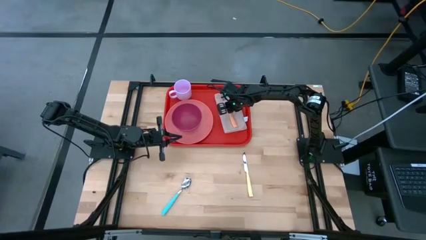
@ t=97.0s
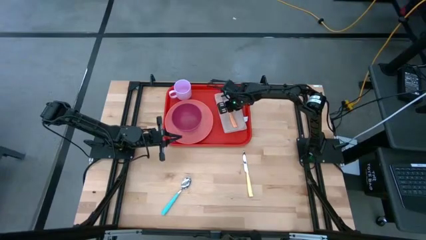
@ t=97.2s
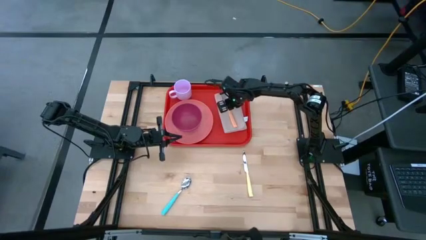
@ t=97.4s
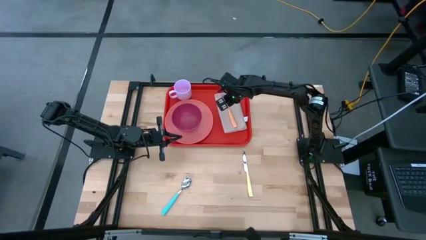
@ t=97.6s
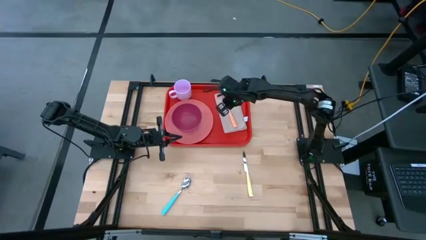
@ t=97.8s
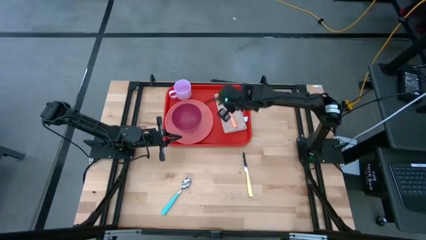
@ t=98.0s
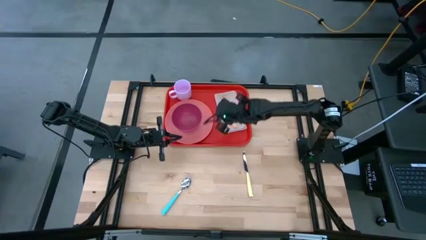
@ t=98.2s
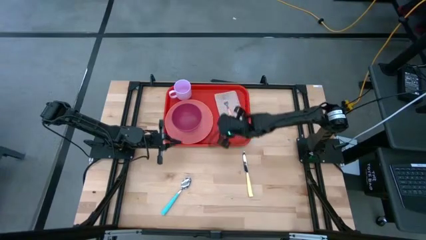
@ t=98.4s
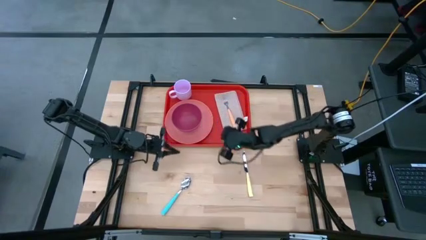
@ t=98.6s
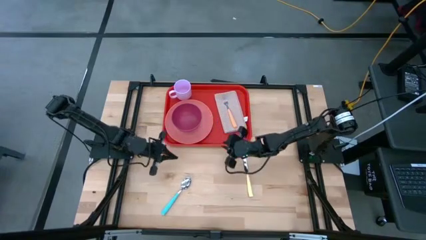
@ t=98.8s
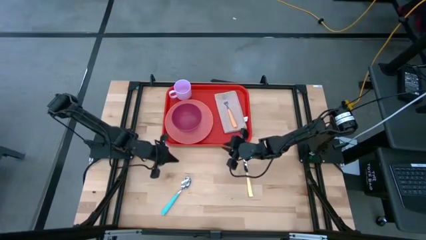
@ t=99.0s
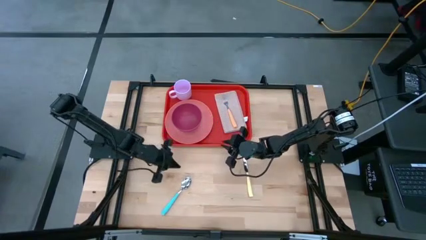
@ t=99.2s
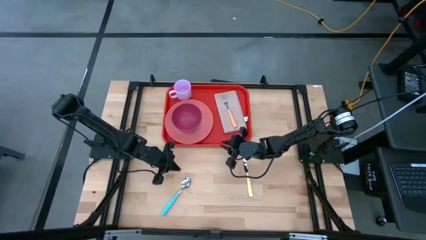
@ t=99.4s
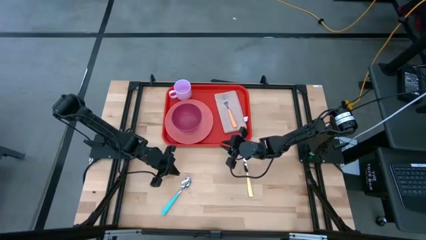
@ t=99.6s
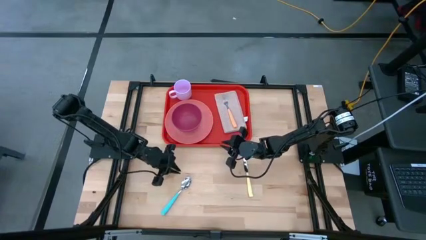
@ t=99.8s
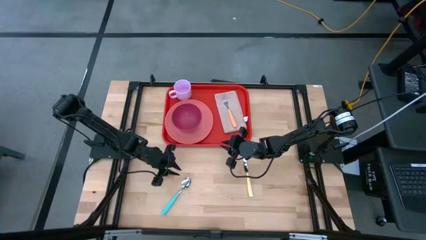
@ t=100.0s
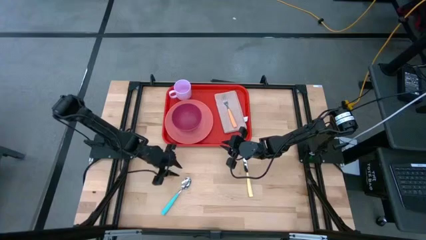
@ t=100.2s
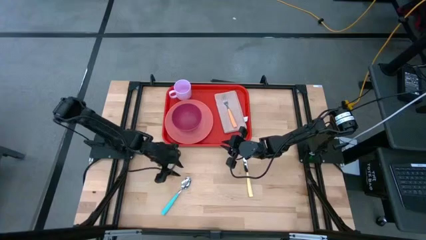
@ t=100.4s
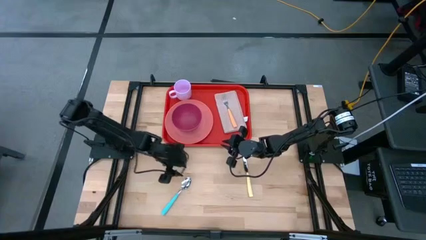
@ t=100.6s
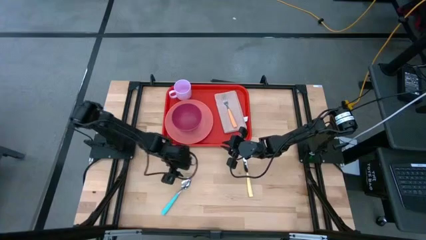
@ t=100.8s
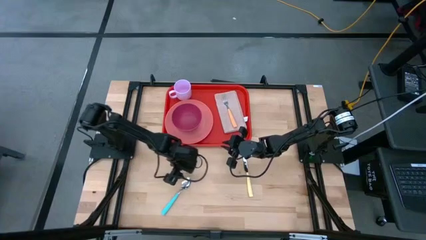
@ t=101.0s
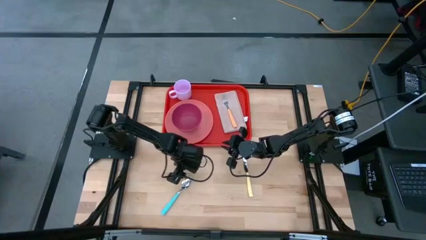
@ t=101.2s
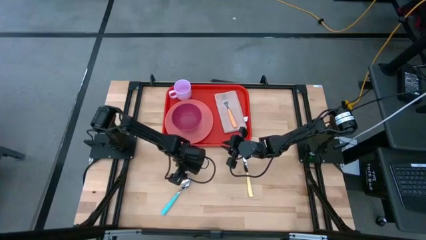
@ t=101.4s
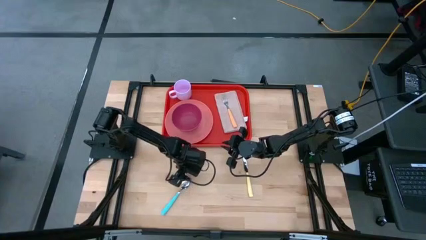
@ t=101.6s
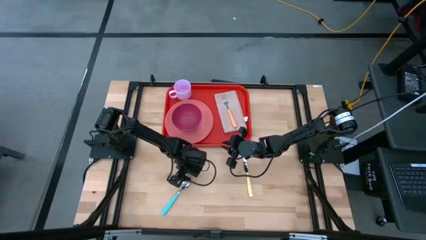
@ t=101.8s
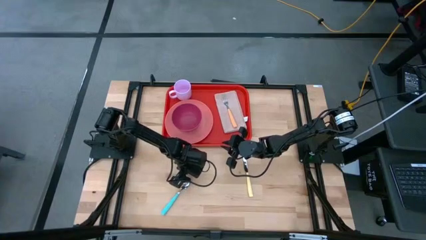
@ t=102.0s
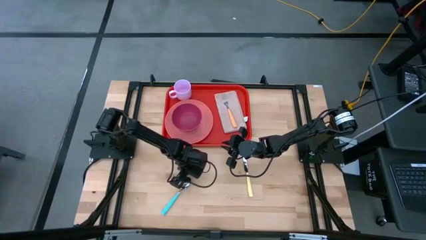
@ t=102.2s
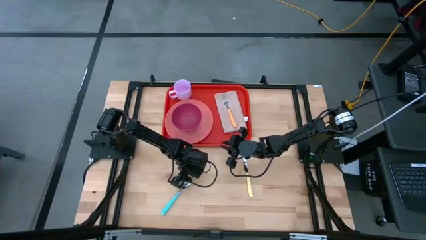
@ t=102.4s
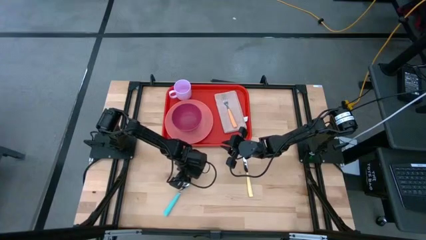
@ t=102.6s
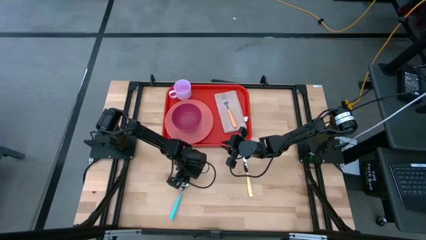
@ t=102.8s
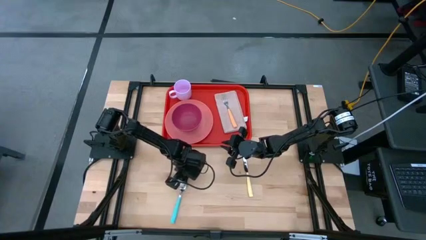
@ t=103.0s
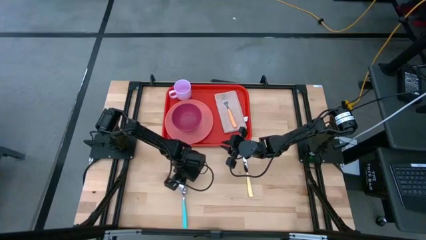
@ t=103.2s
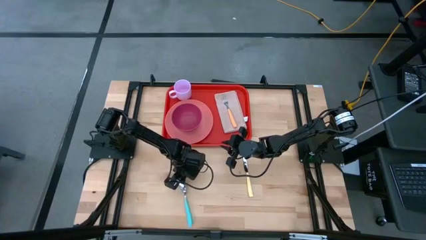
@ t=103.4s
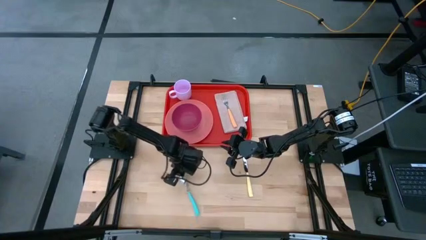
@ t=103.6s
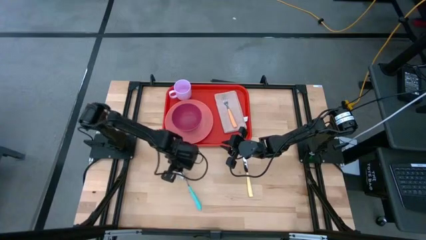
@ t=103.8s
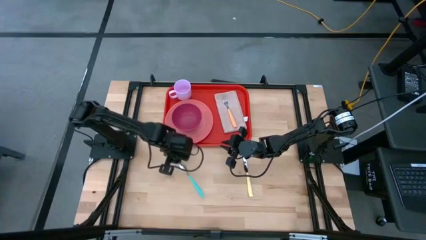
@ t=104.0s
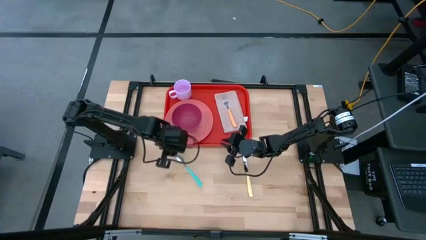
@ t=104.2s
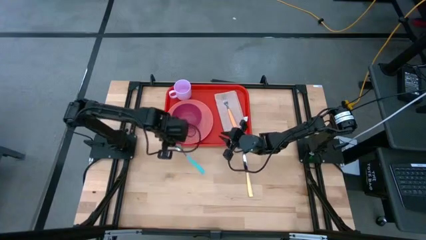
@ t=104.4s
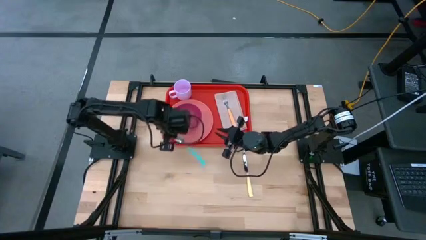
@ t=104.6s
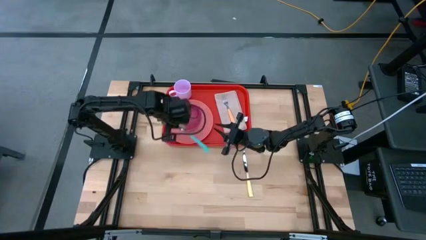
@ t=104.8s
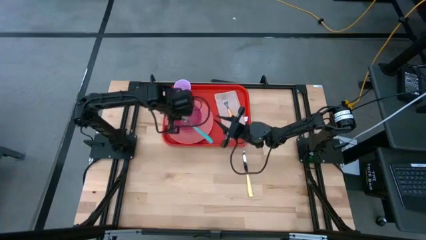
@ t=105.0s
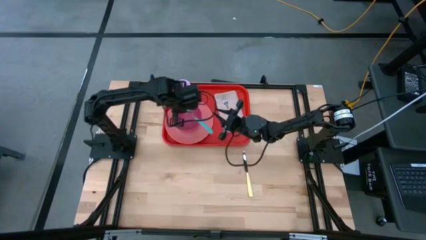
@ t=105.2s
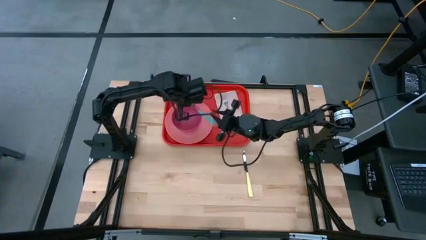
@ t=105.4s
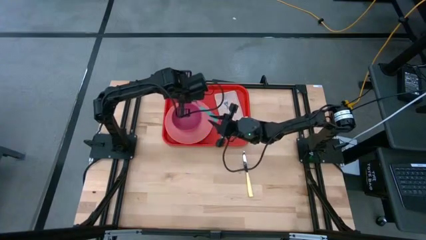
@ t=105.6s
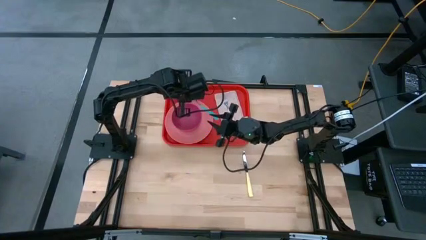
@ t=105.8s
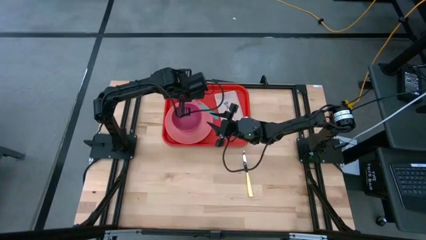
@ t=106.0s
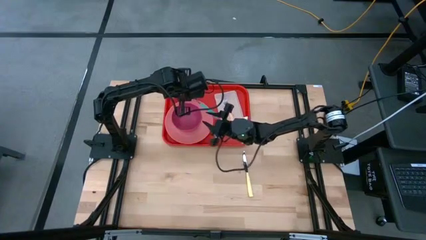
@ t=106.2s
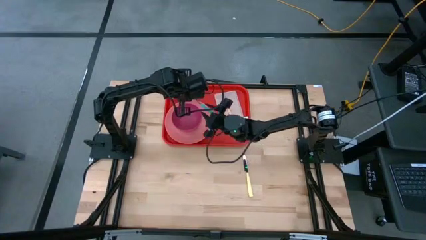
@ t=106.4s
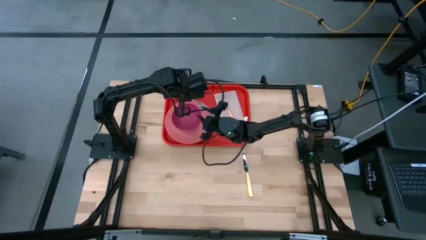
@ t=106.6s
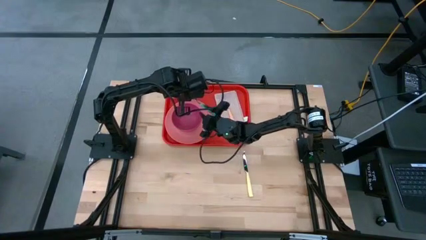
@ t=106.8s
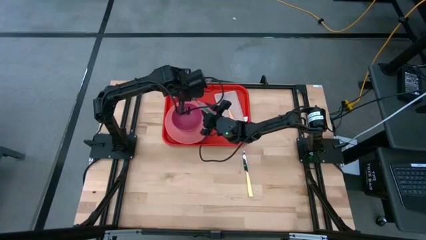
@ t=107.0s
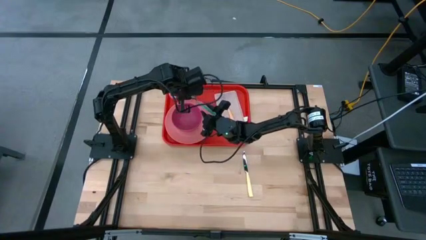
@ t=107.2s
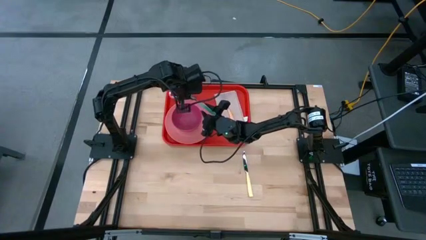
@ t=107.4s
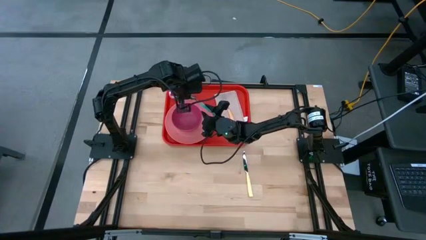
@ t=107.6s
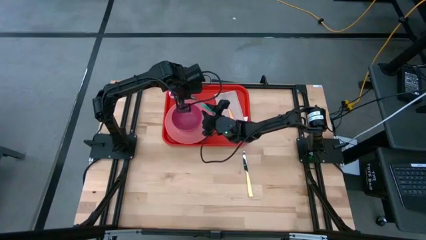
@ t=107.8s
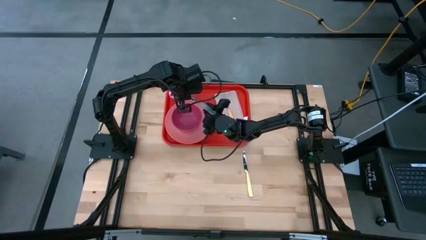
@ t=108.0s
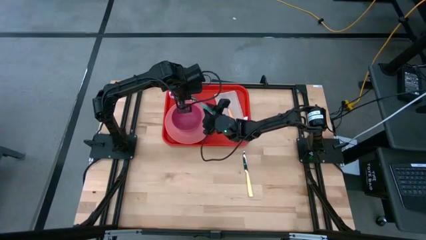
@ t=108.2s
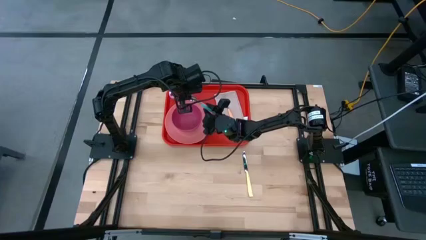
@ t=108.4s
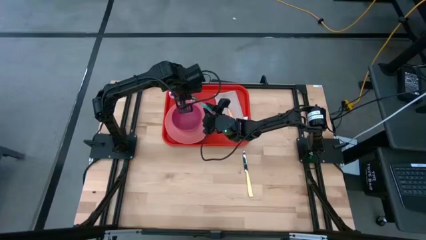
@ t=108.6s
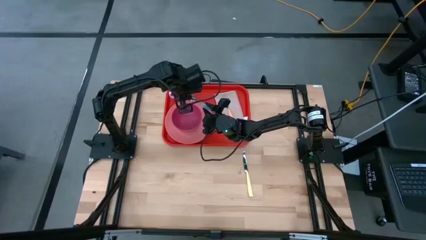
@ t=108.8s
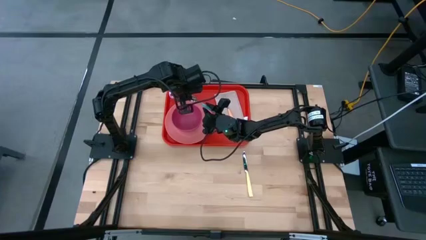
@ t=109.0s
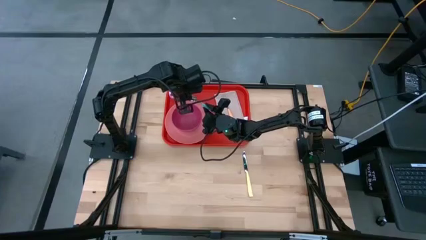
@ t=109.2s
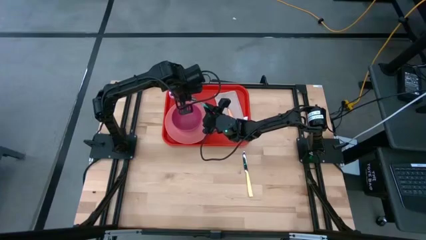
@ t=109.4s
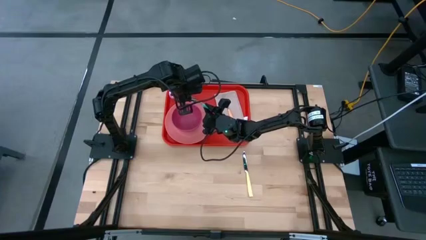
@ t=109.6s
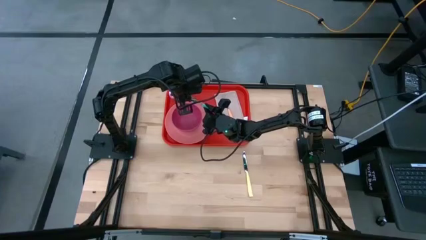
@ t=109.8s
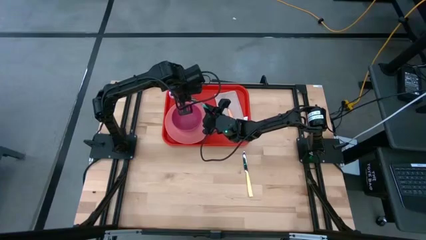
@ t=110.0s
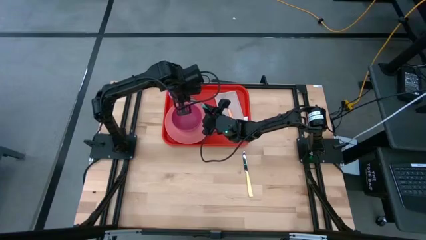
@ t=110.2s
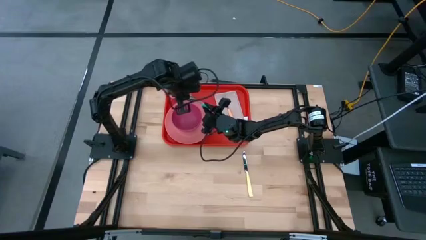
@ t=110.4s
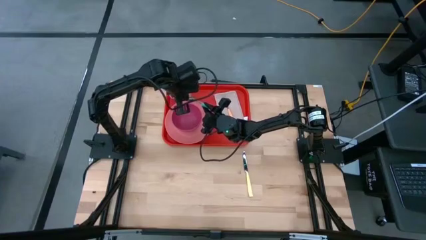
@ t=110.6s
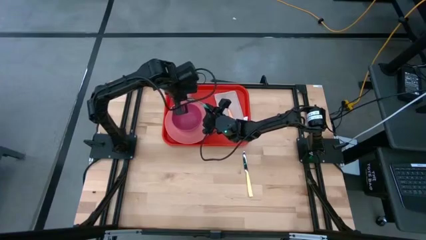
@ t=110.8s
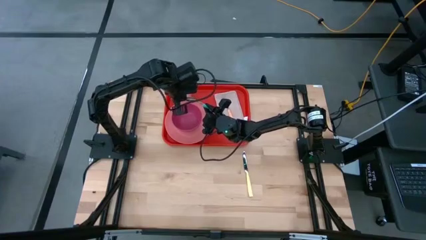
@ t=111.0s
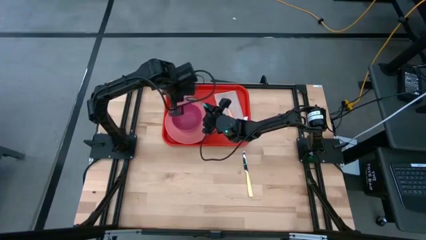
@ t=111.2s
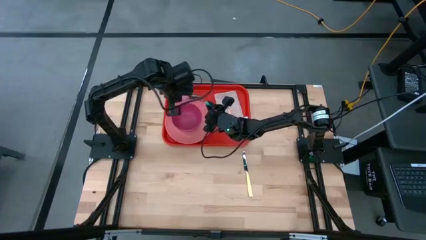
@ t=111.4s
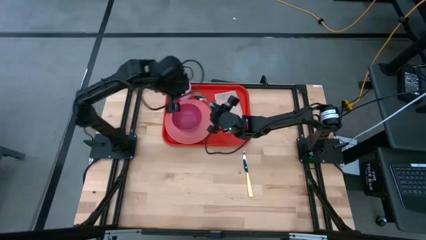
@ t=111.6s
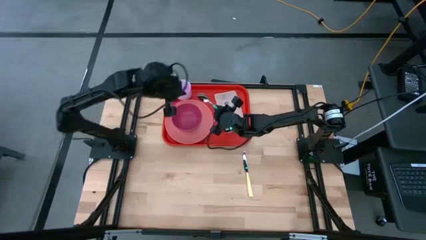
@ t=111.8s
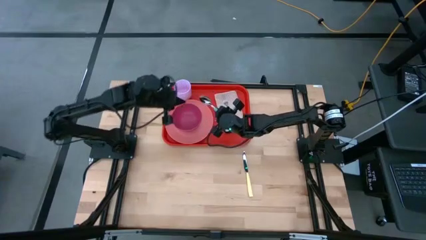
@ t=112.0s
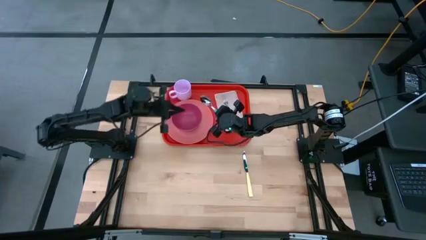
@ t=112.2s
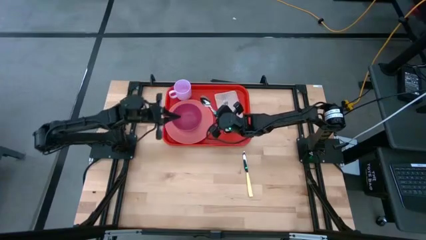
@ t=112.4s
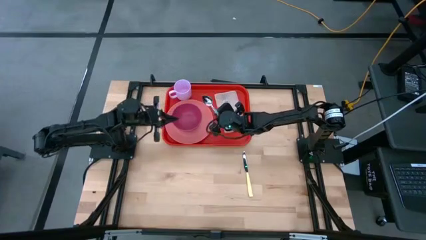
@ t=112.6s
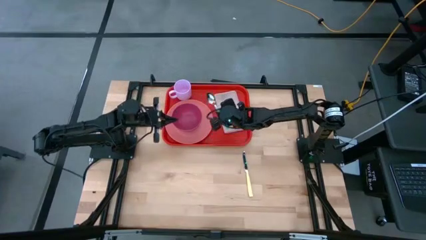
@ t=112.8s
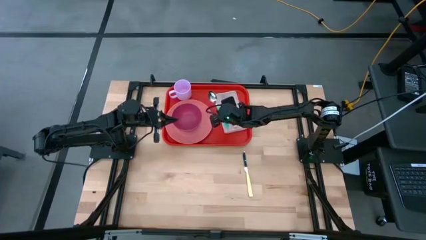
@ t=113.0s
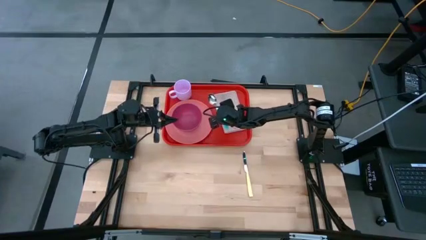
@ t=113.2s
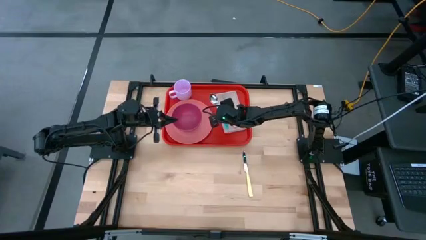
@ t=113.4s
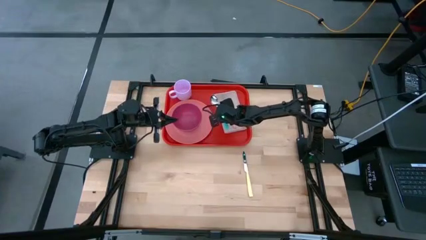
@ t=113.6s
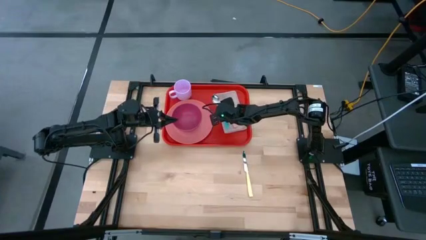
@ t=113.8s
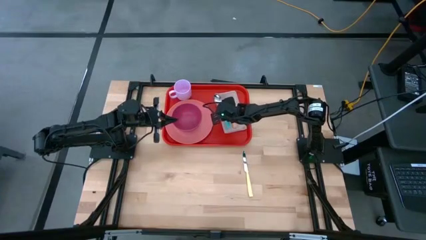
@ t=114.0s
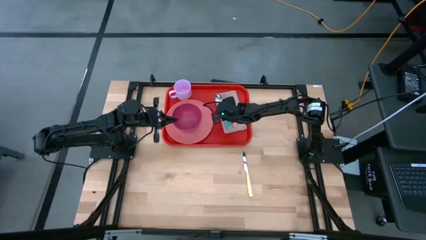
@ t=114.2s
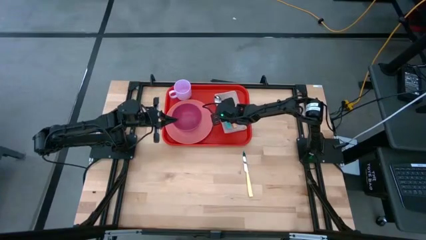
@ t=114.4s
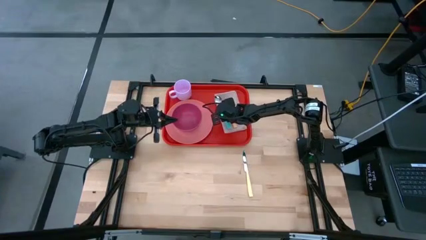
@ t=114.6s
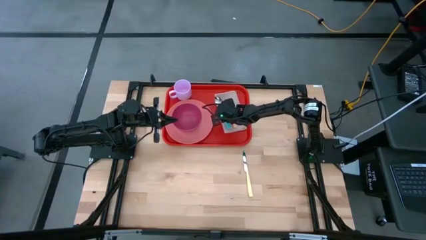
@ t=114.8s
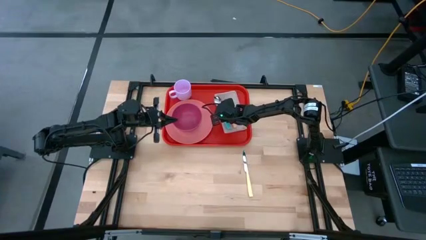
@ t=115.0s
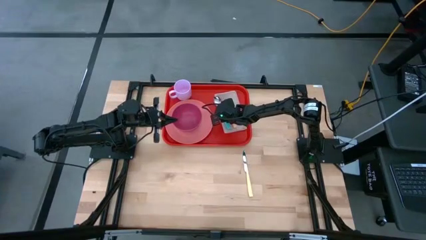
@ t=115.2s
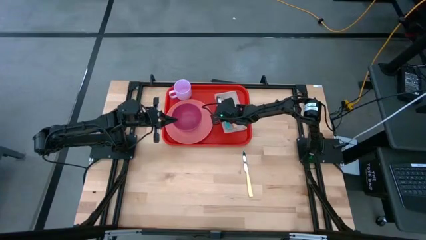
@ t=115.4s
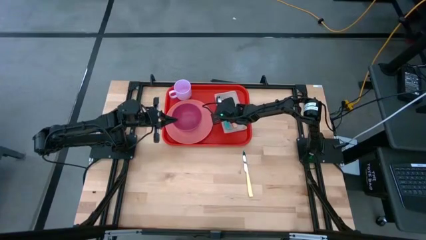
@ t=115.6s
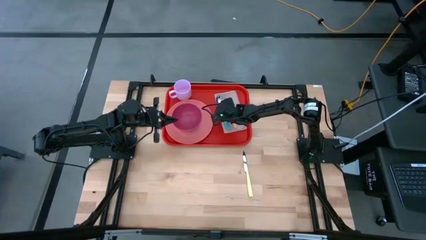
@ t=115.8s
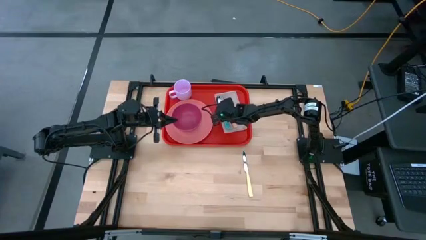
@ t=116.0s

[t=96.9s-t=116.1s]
Task: Set up tray
Put the blue spoon on top of the white table napkin to the left of the orange fork
